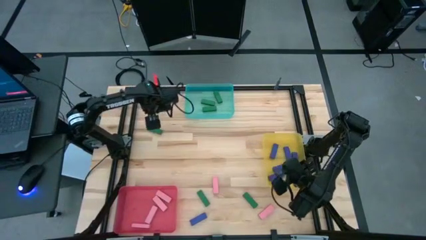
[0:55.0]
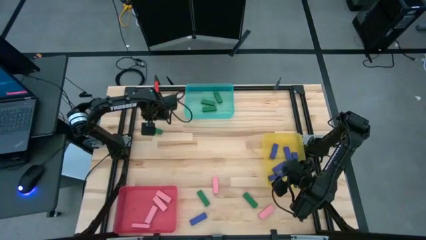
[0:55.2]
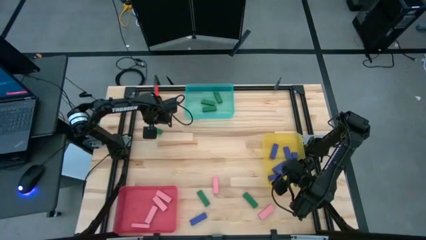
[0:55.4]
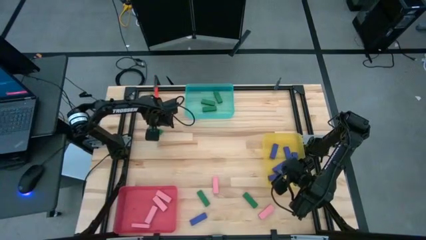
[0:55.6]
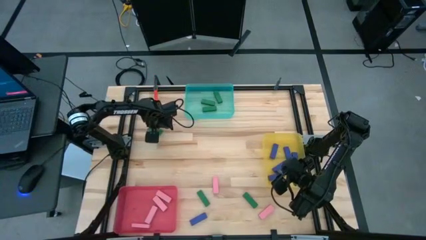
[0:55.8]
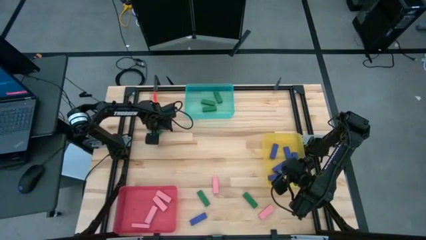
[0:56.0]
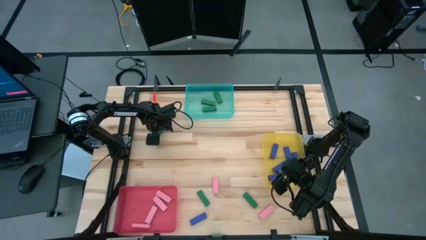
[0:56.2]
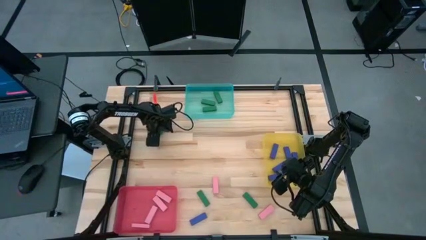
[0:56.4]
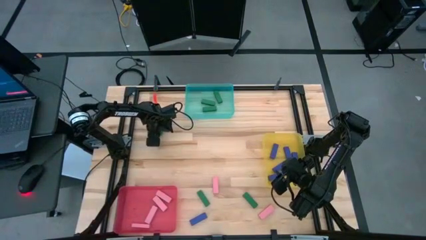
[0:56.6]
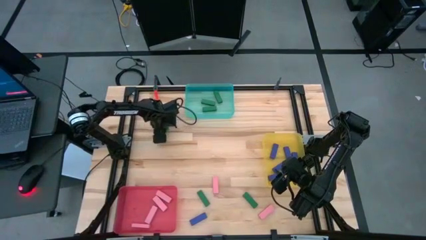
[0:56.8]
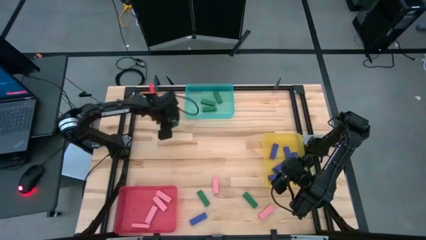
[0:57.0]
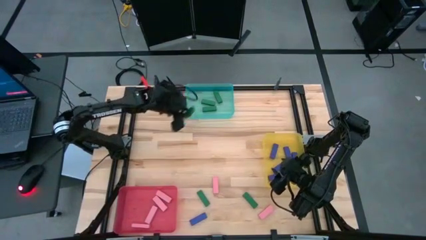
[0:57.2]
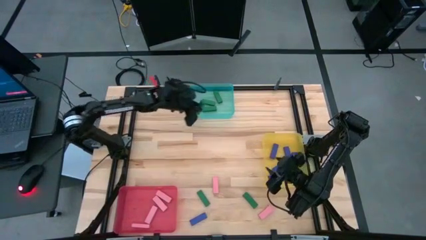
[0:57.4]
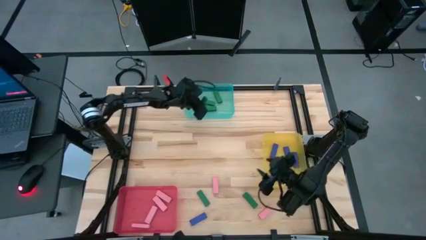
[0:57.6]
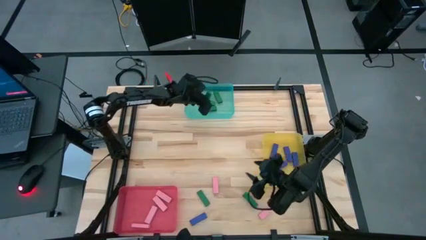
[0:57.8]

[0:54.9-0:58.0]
Task: Sort blocks
Put the green block into the blue bin

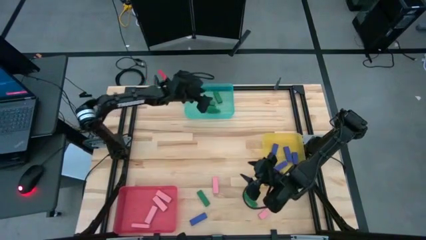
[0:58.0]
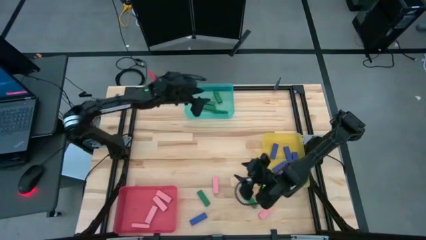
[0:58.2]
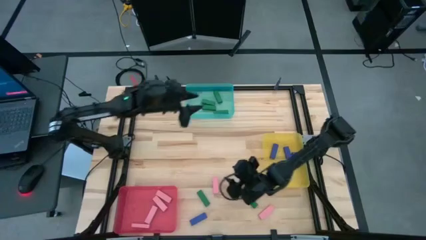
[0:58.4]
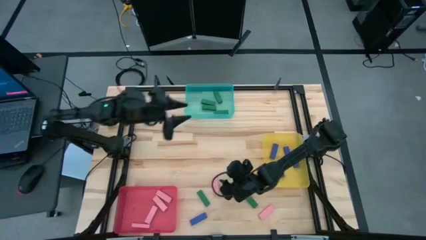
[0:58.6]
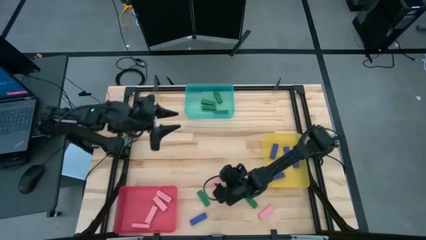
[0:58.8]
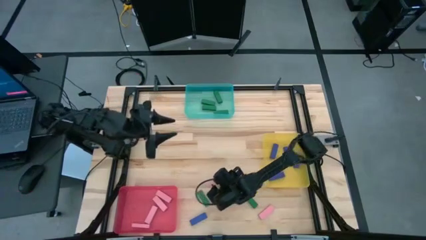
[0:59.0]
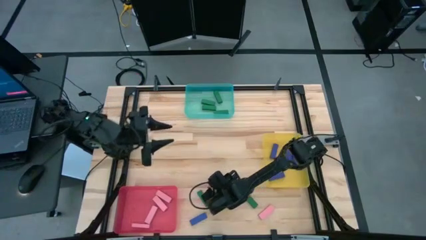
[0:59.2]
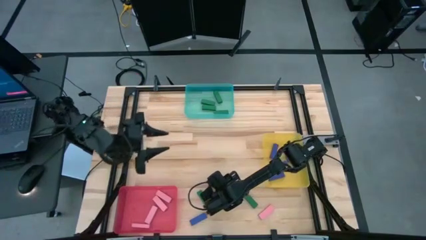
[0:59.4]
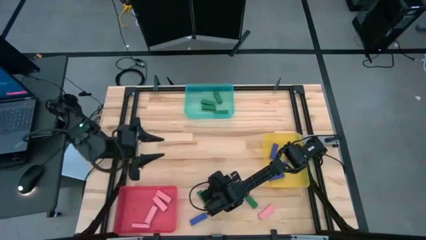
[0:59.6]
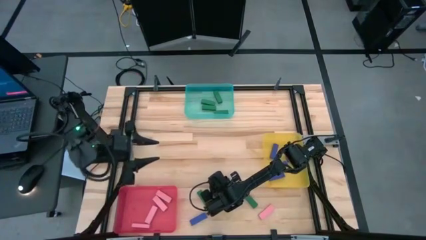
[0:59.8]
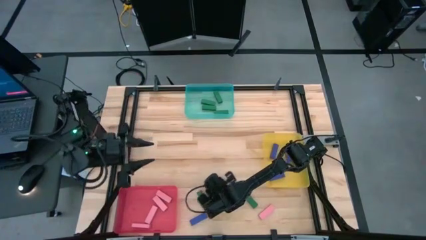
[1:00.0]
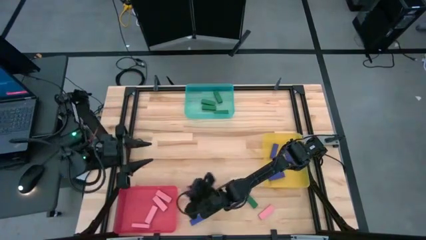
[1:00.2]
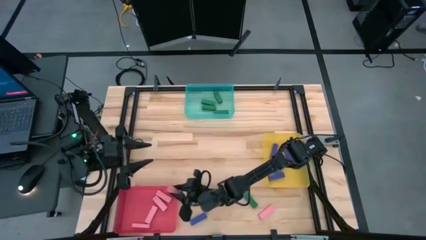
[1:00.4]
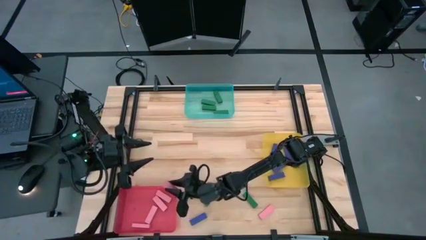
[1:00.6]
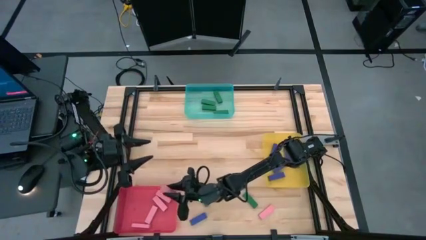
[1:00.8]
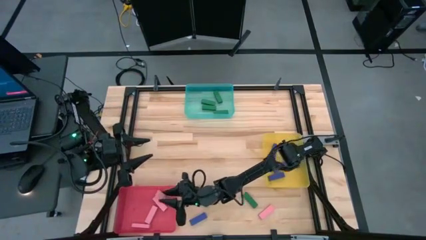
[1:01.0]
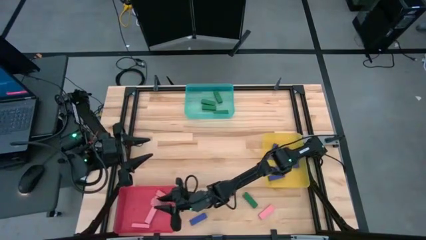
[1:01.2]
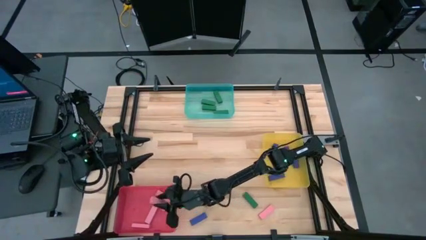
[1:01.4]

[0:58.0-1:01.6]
Put the pink block into the red bin

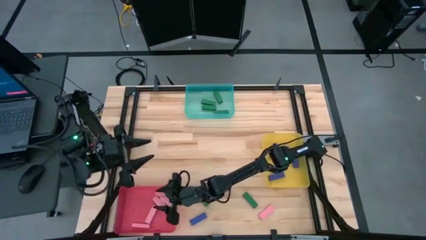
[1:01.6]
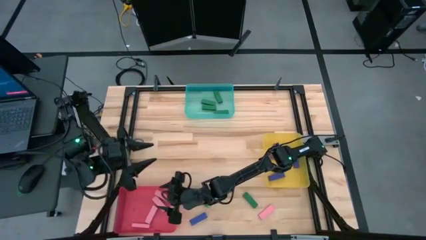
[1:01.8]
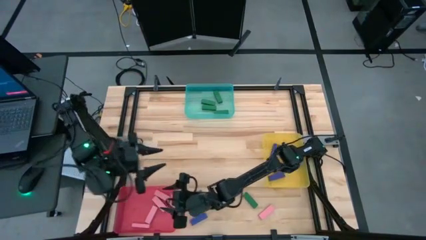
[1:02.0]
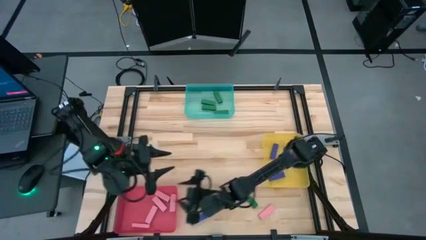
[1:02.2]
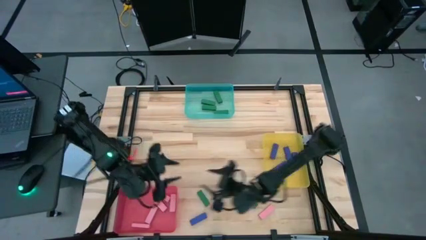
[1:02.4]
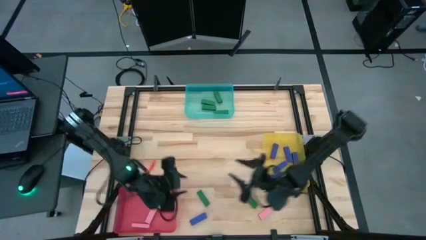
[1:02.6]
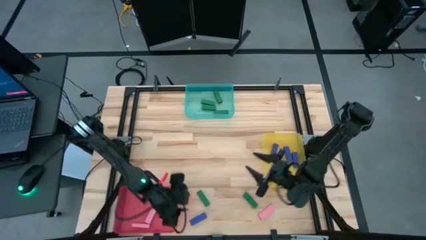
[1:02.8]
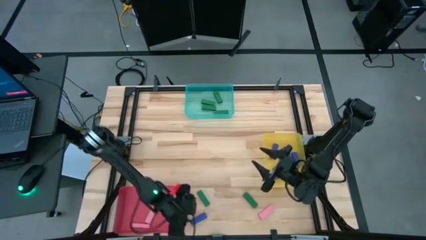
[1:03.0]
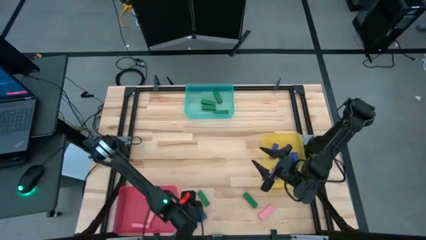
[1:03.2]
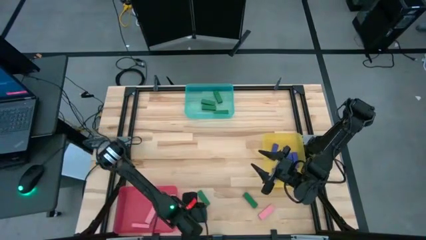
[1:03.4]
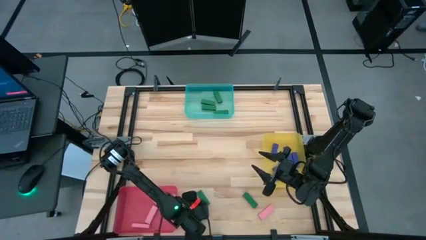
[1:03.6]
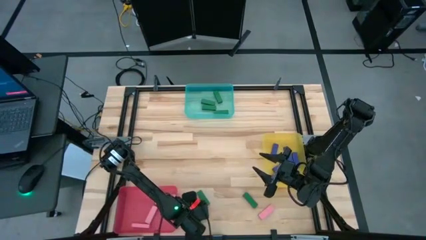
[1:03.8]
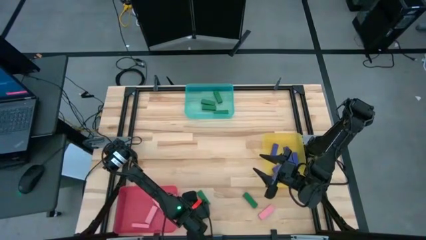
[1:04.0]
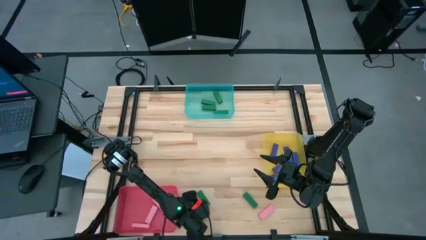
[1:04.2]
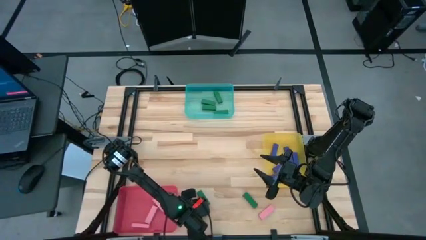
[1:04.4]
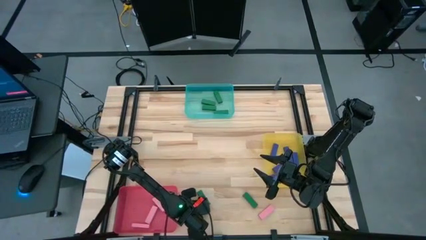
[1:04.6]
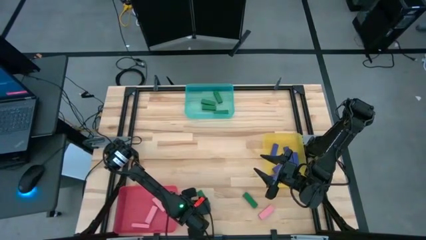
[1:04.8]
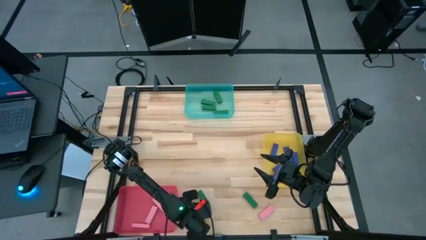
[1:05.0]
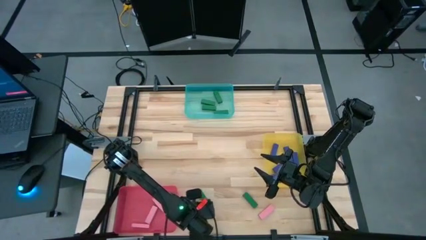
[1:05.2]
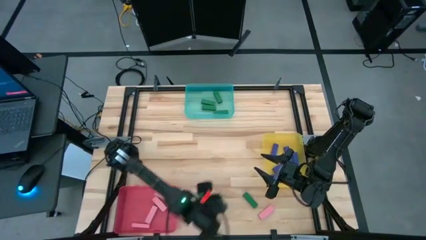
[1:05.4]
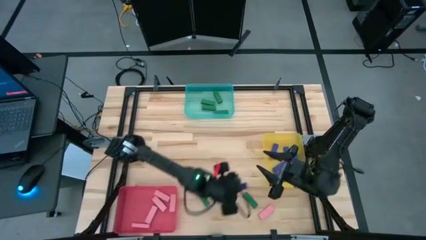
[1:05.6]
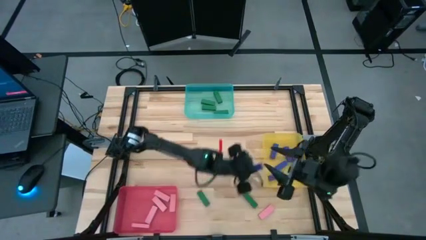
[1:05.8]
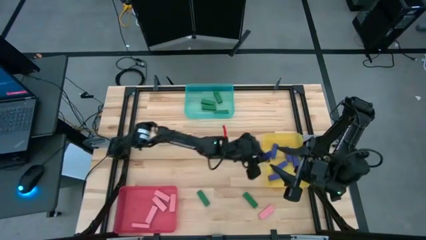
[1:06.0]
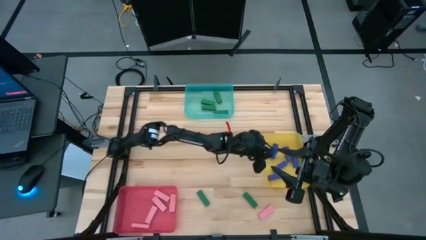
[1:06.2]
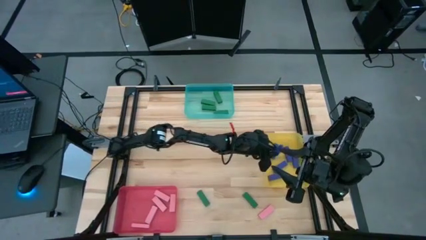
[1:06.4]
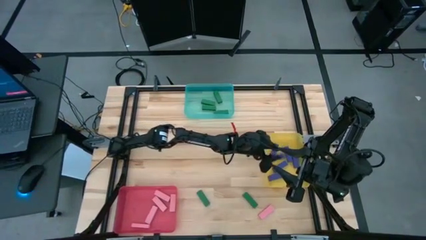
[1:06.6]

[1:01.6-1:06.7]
Put the blue block into the yellow bin

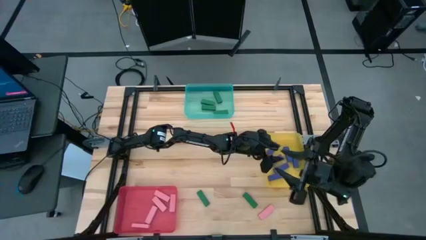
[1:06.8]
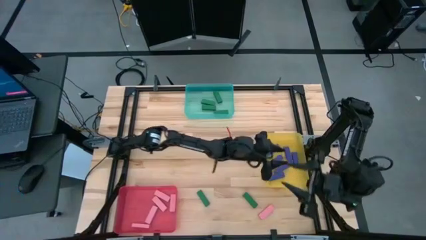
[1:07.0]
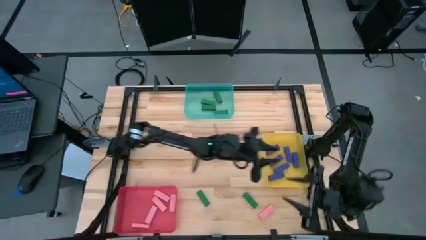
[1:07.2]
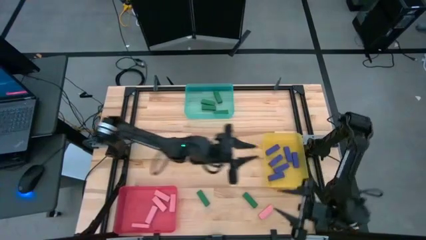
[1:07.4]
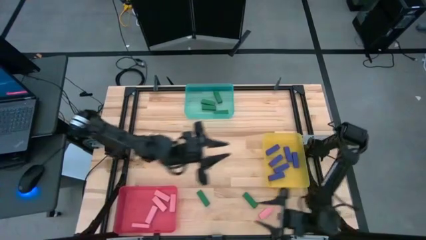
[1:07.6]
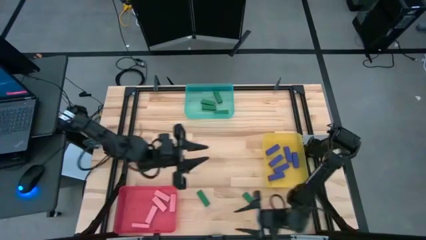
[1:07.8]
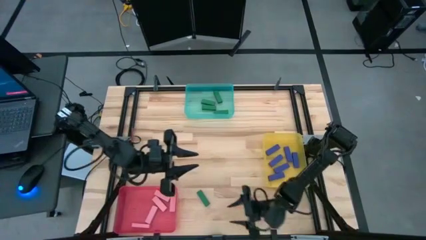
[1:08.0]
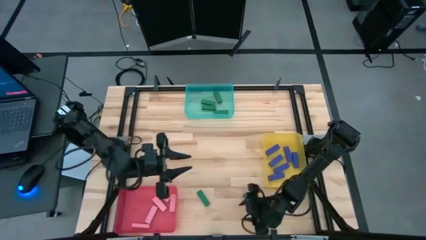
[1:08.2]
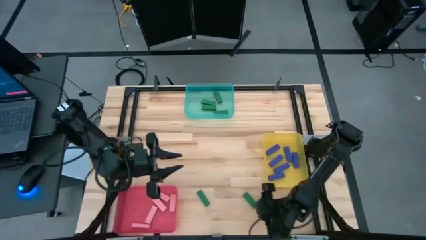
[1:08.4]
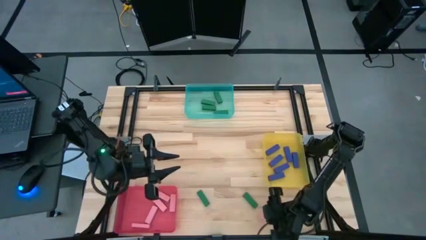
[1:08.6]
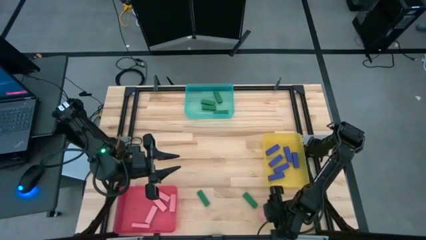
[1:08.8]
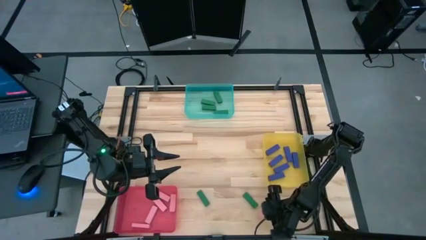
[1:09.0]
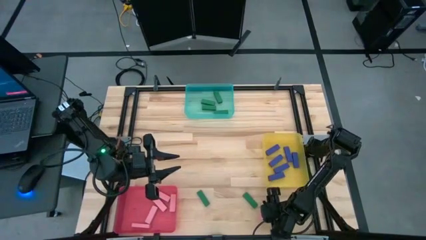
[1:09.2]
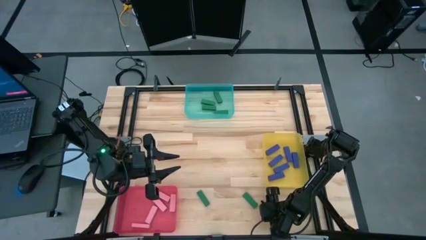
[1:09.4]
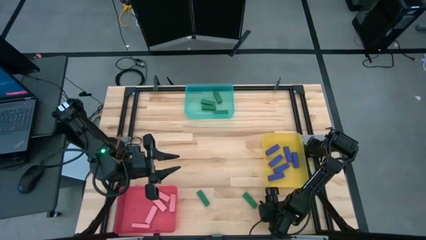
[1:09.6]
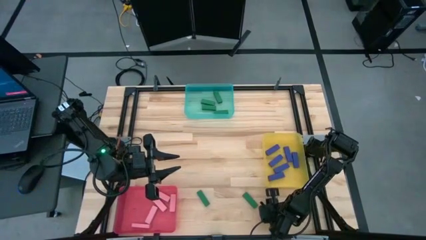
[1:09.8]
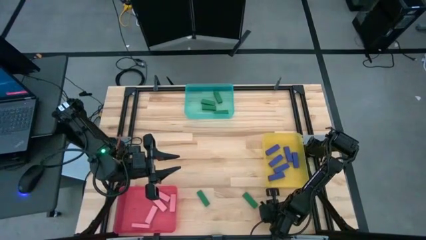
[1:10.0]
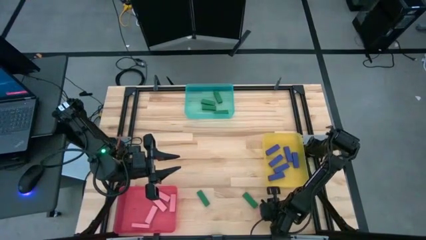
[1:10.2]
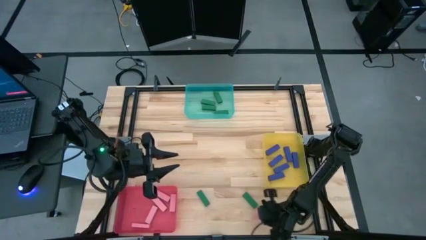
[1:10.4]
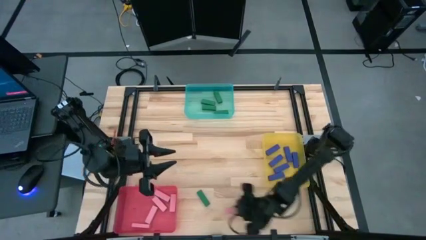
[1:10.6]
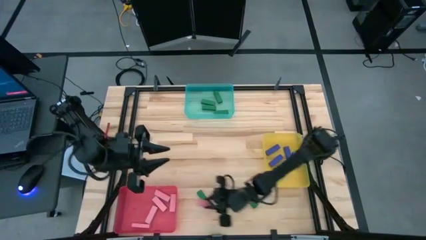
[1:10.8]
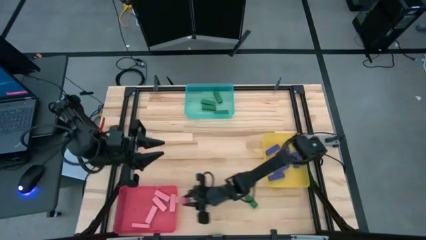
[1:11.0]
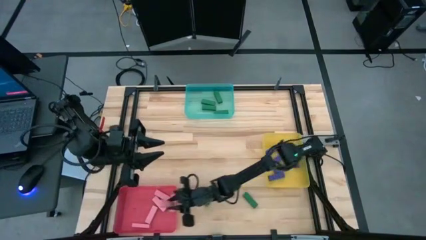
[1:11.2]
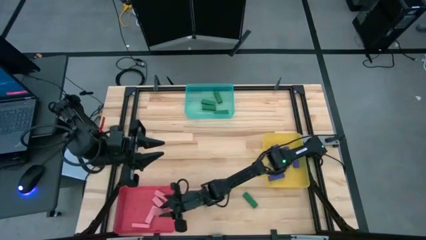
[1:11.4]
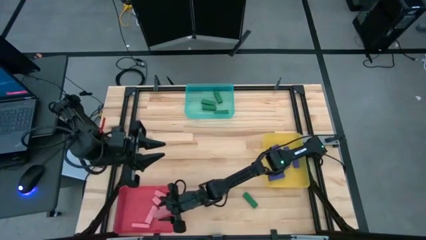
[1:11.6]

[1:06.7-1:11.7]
Put the pink block into the red bin
